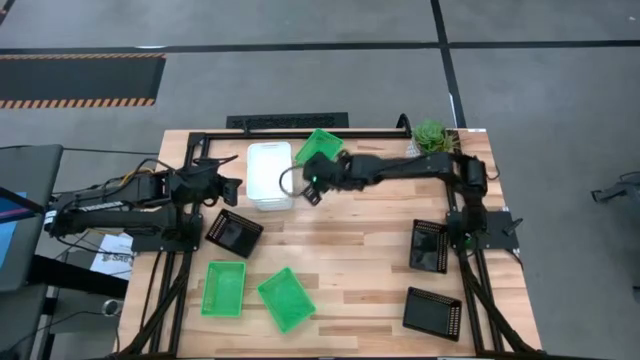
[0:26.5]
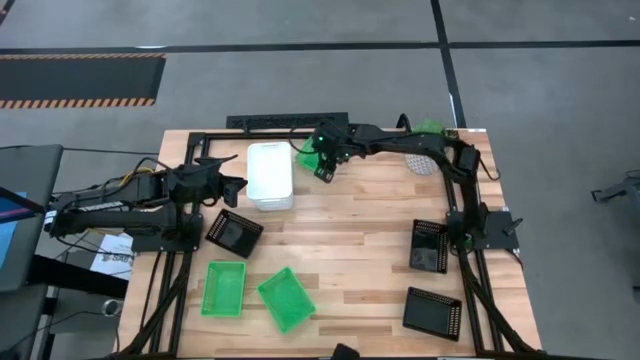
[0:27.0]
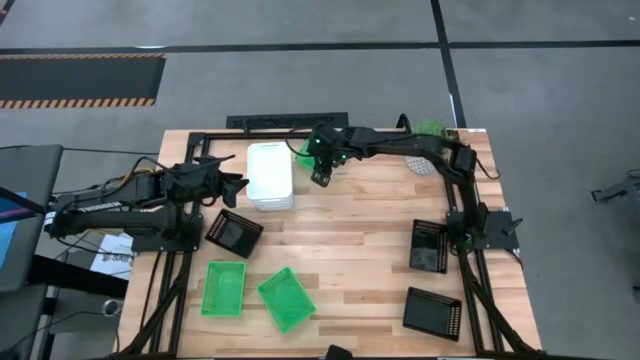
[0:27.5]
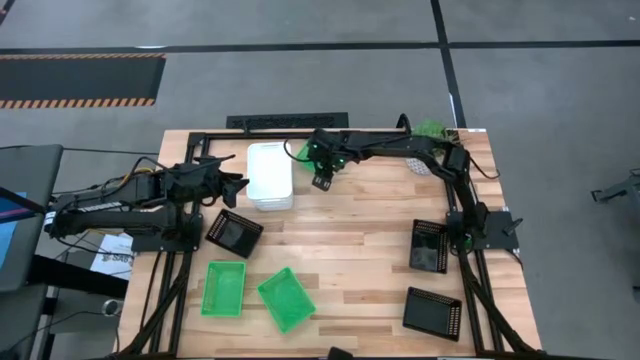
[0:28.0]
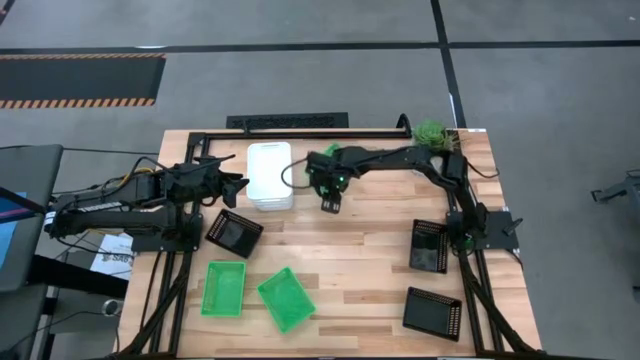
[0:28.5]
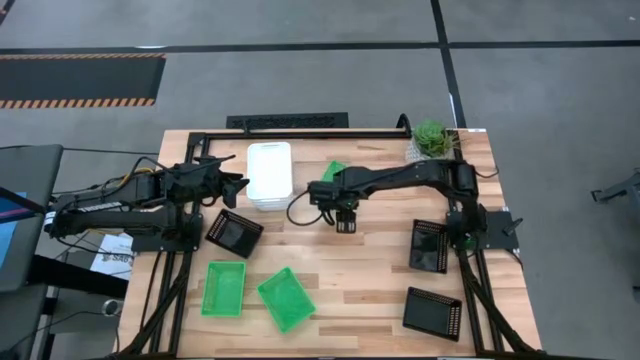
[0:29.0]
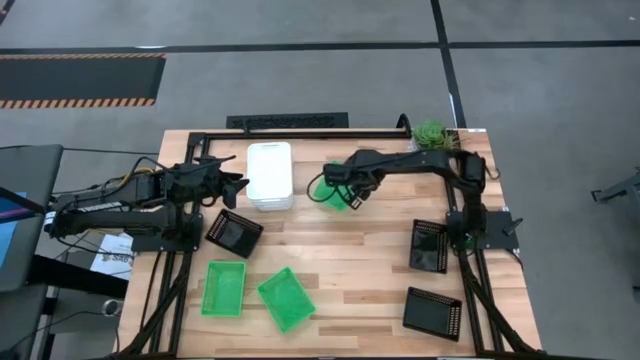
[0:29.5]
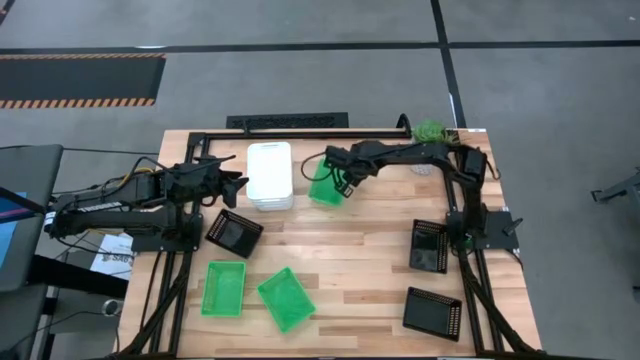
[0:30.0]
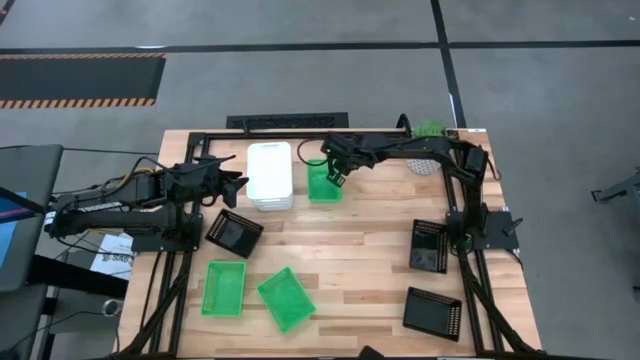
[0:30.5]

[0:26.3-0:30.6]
Adjust the green bin

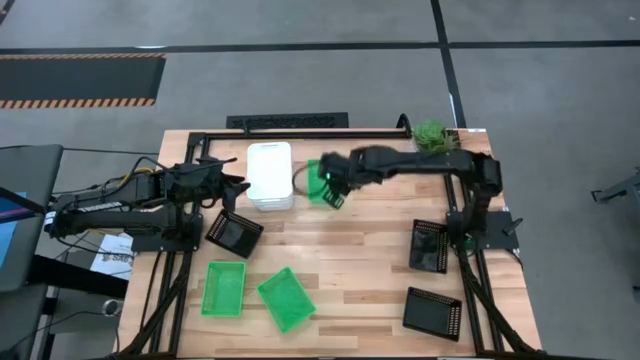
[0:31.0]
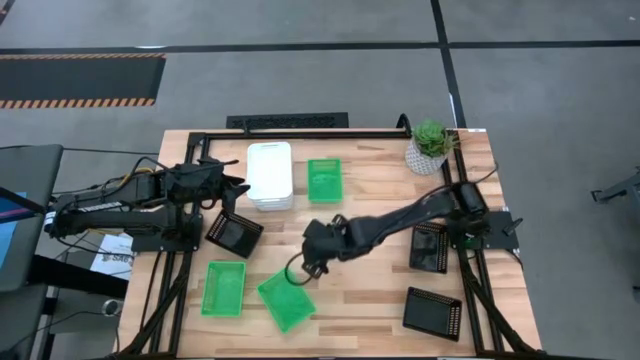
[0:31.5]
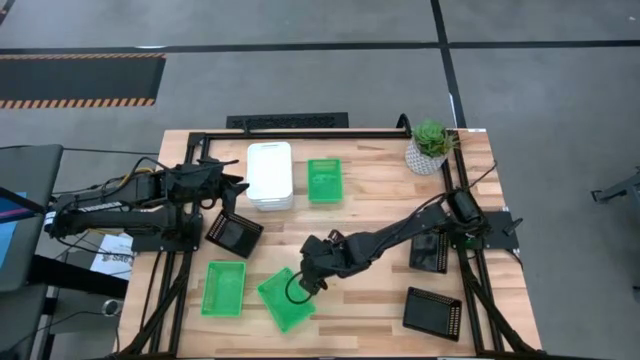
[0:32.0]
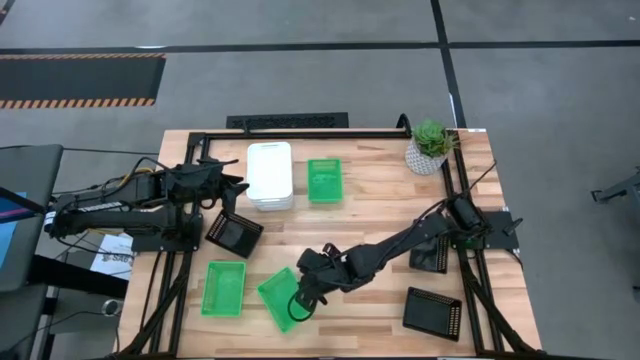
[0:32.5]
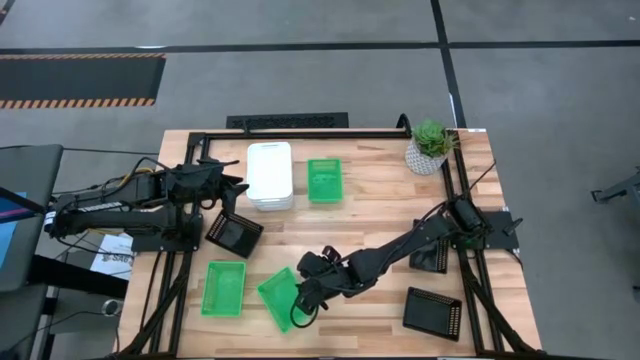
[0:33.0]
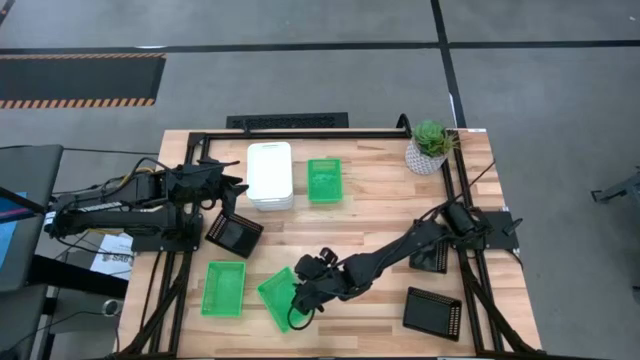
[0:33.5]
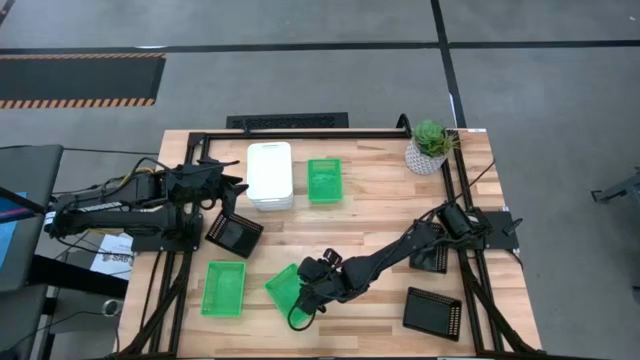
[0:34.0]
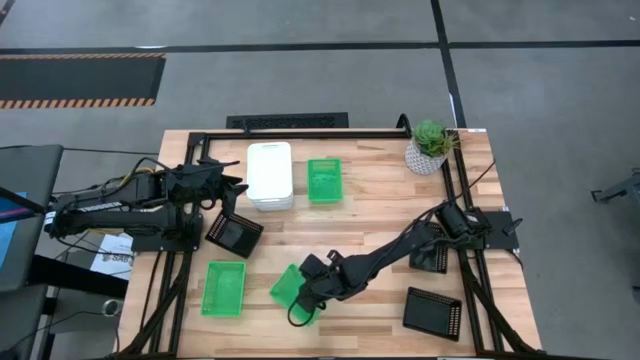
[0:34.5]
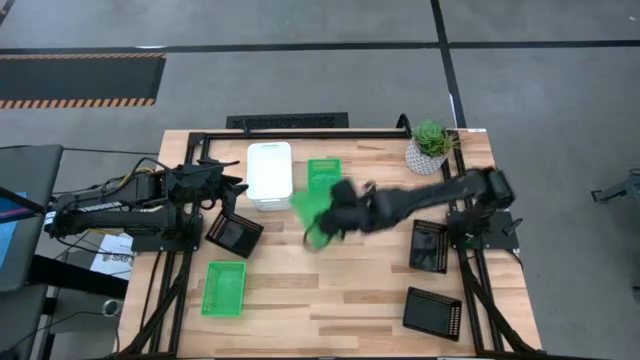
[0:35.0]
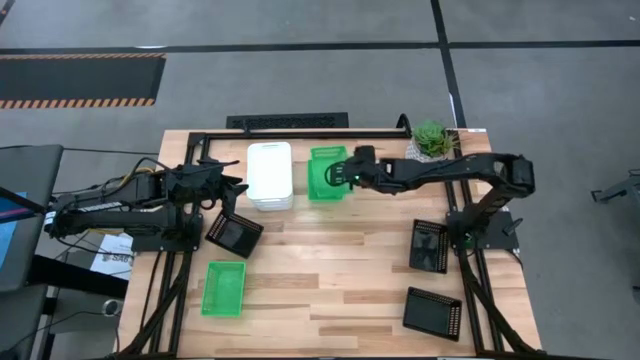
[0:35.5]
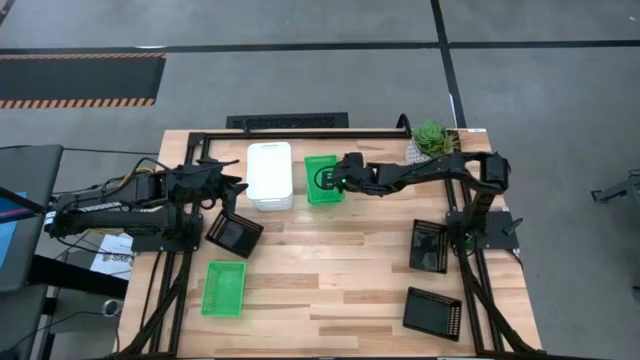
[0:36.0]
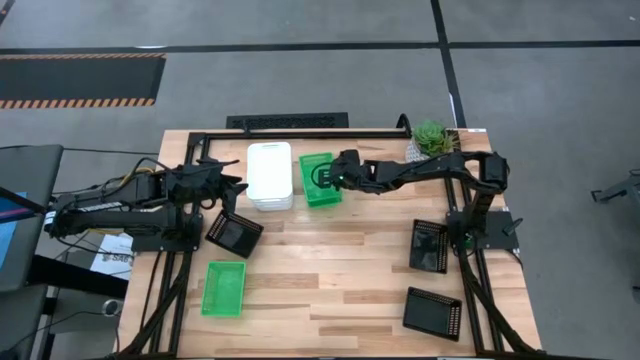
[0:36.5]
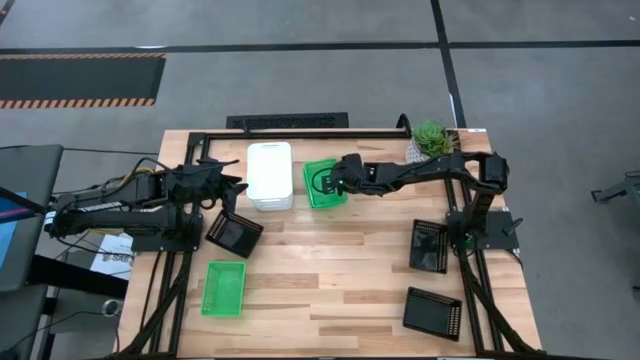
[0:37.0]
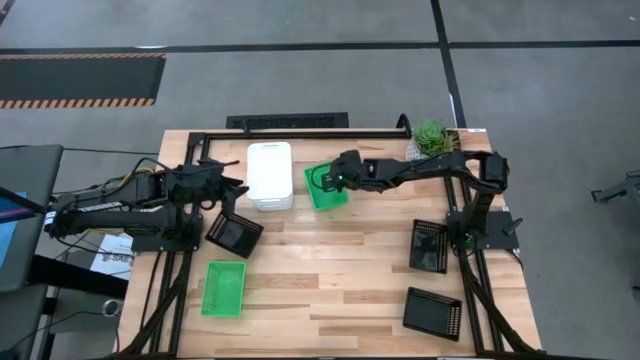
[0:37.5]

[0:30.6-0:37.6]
Stack the bottom right green bin on top of the top green bin

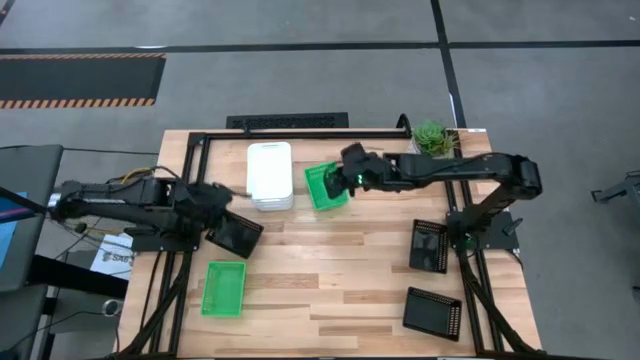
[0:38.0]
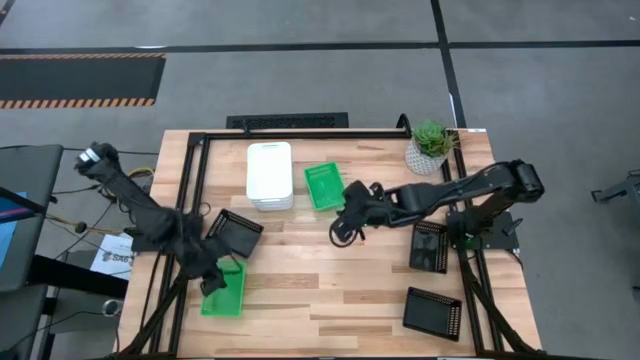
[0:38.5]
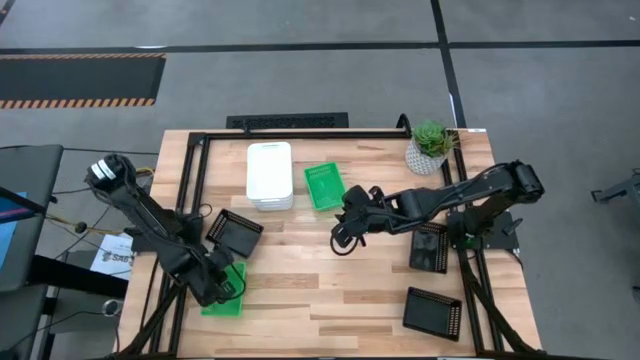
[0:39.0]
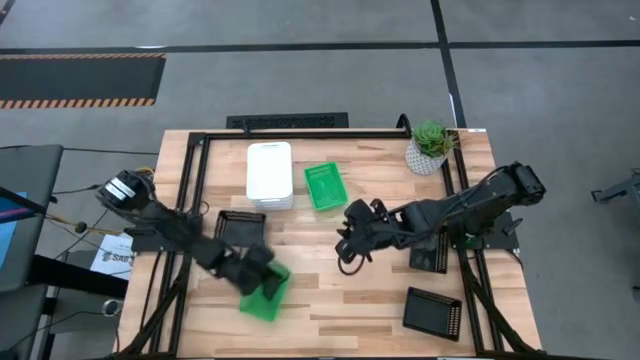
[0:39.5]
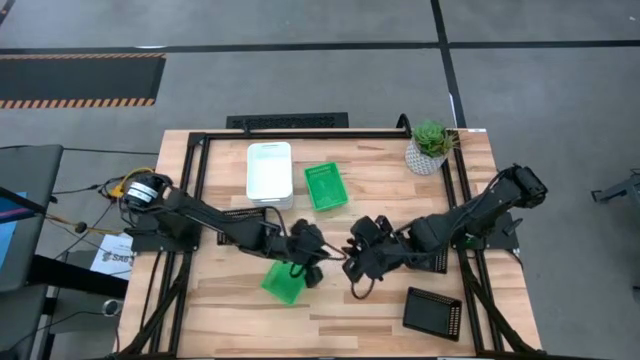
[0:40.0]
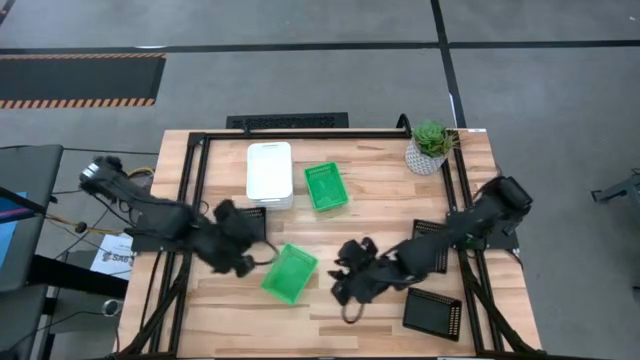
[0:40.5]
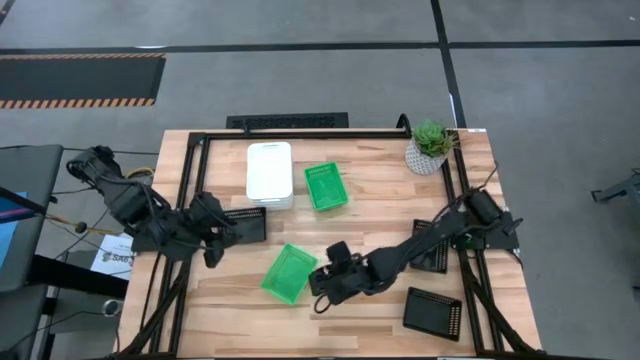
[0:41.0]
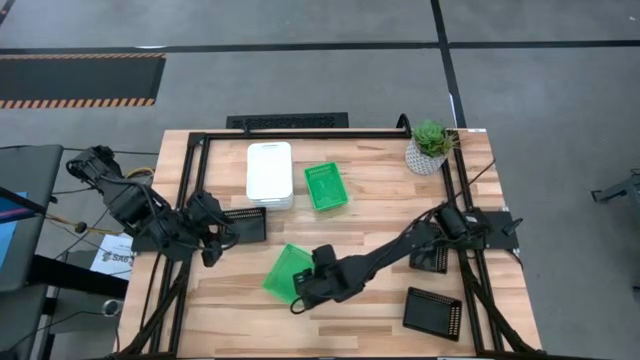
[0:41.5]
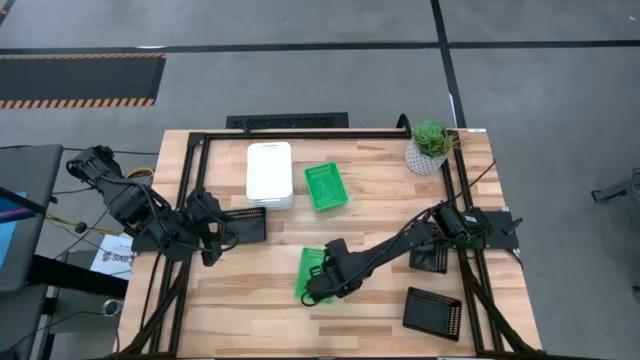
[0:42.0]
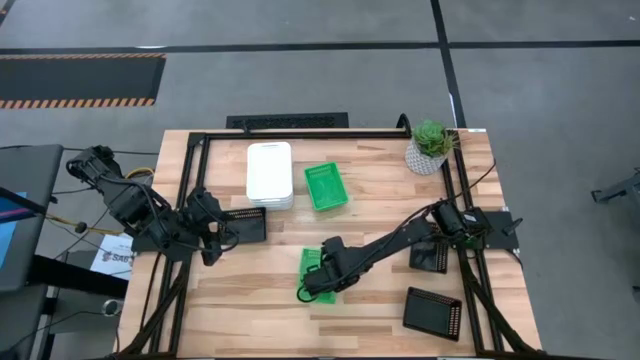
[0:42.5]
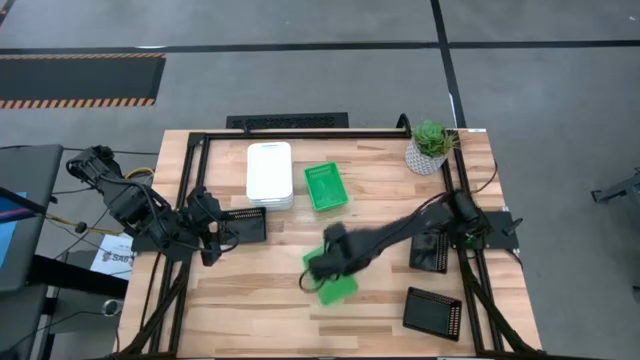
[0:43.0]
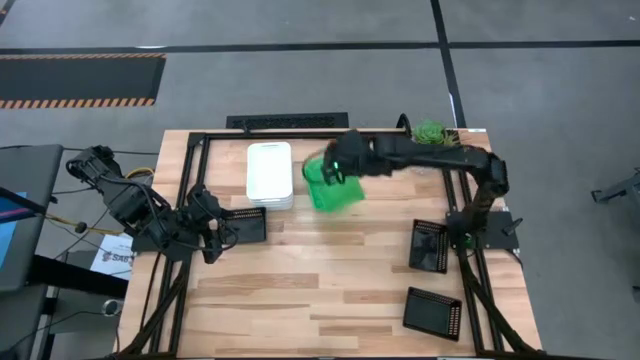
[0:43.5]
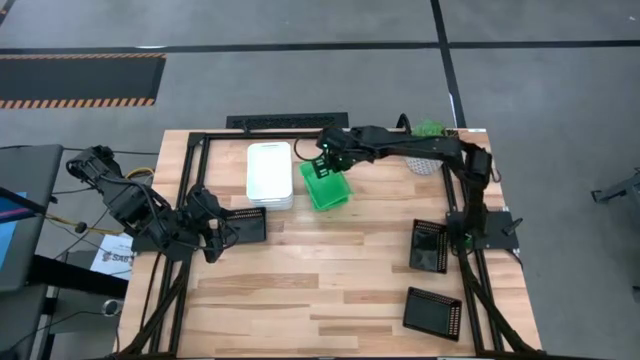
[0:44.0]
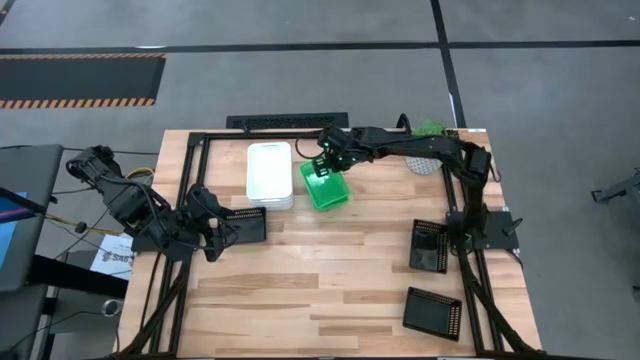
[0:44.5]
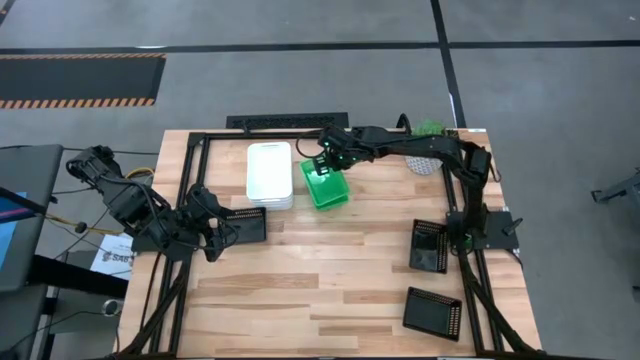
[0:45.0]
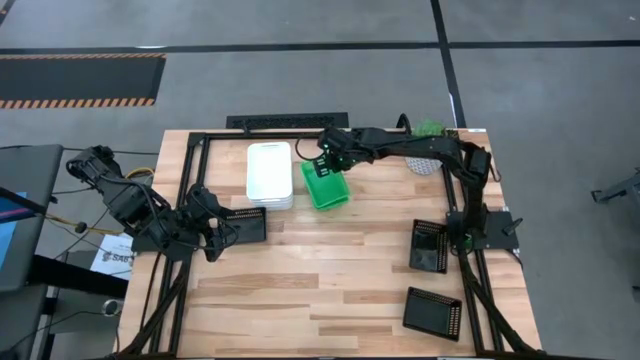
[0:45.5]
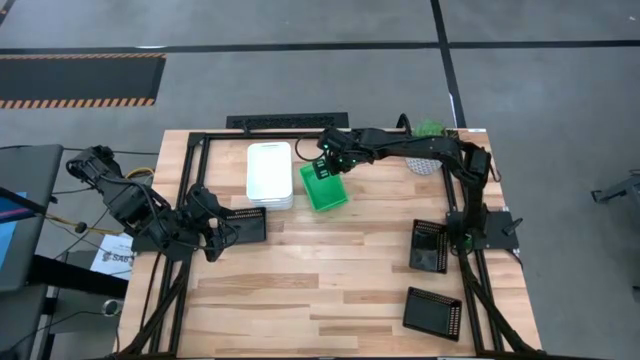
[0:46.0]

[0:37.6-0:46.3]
Stack the green bin on top of the other green bins

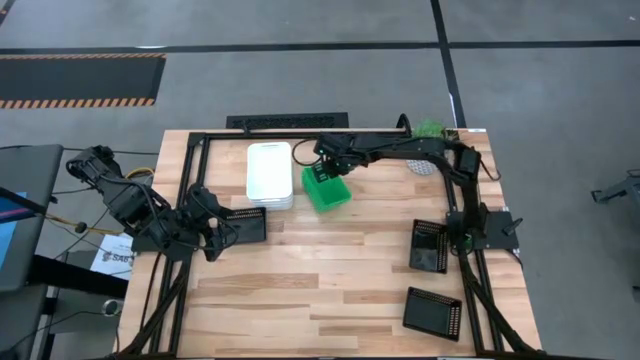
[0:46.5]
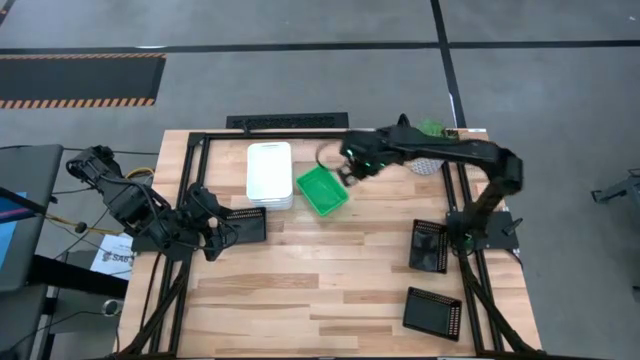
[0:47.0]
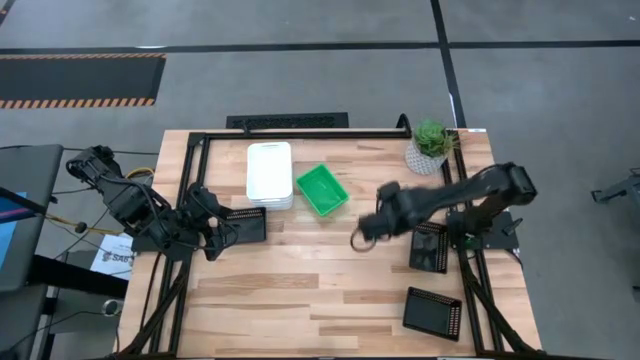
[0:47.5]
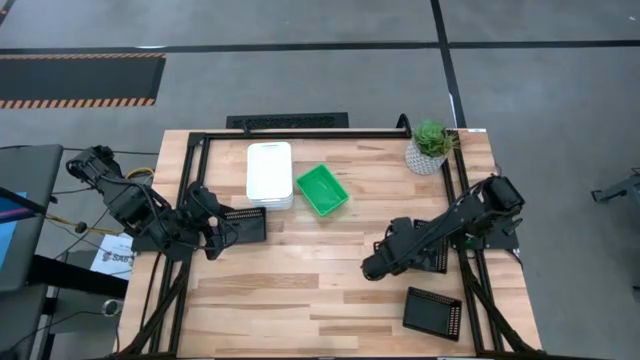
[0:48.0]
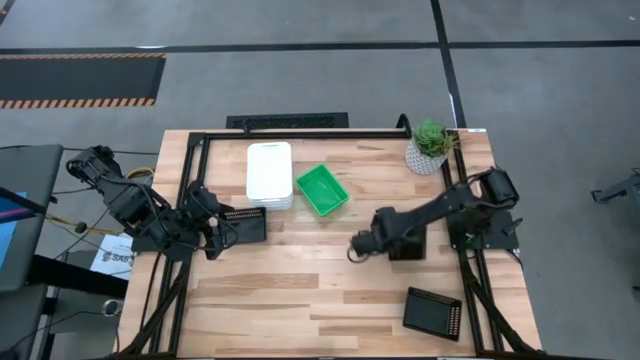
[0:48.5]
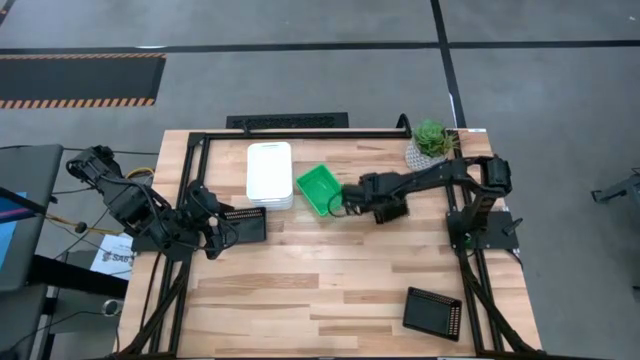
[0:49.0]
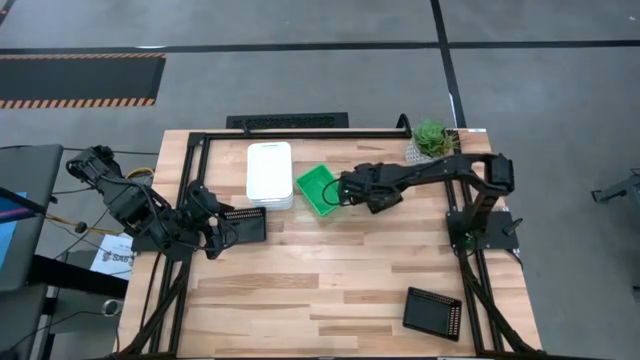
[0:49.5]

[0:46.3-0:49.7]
Move the top right black bin to the top right of the table
